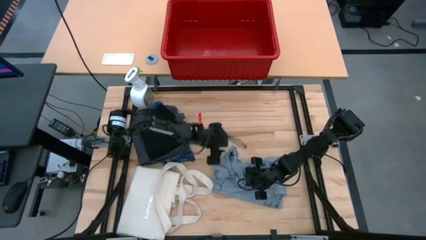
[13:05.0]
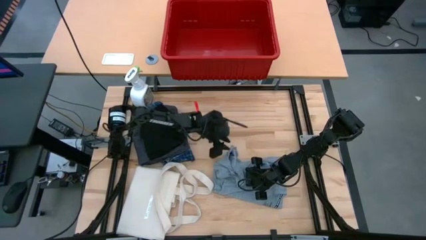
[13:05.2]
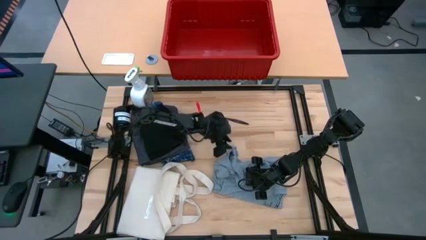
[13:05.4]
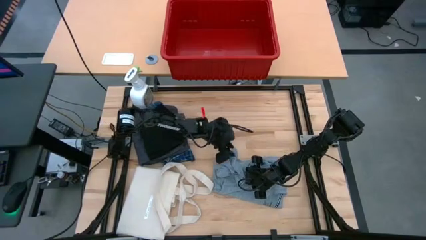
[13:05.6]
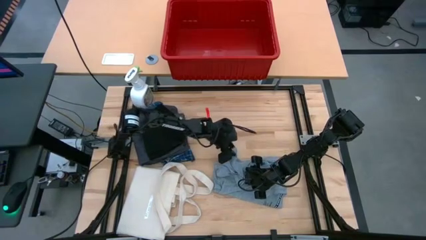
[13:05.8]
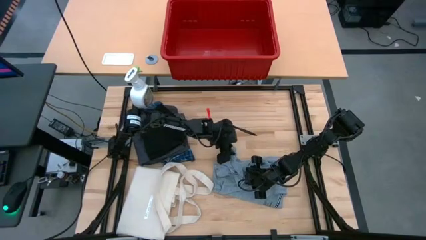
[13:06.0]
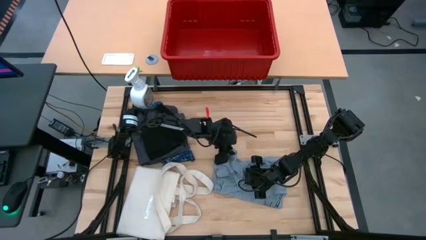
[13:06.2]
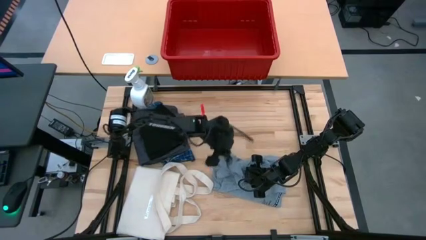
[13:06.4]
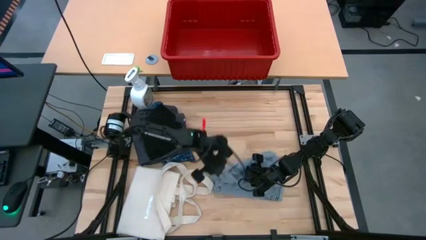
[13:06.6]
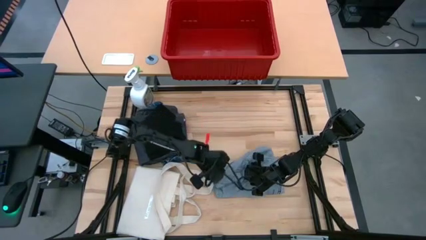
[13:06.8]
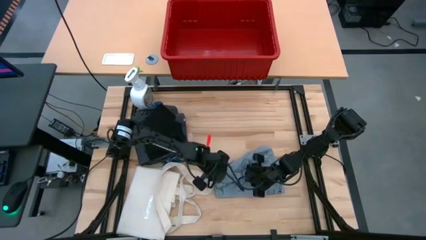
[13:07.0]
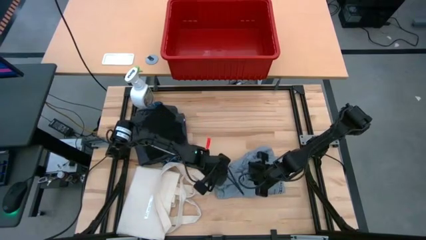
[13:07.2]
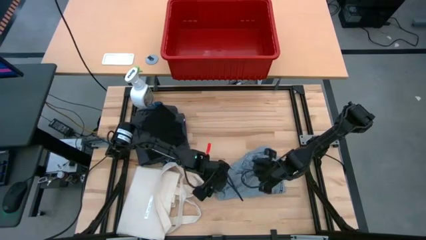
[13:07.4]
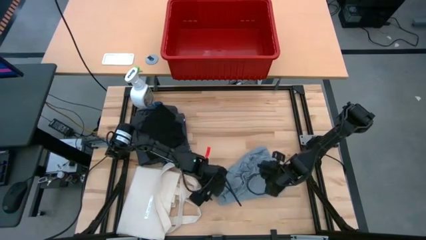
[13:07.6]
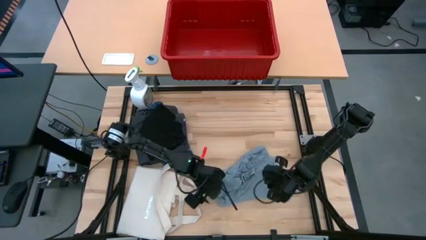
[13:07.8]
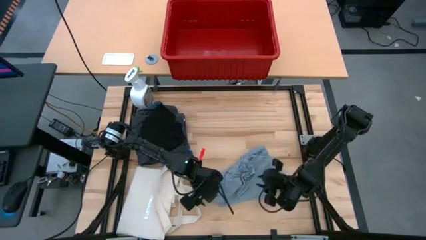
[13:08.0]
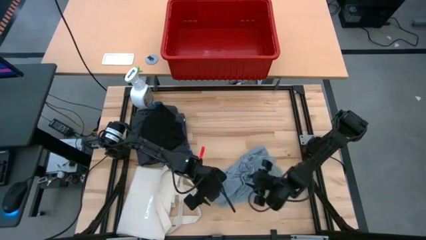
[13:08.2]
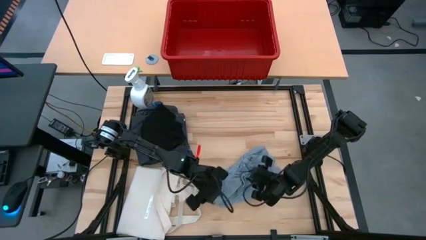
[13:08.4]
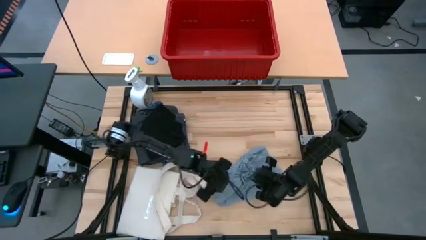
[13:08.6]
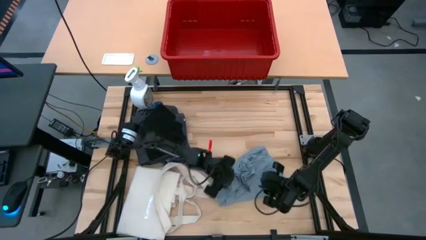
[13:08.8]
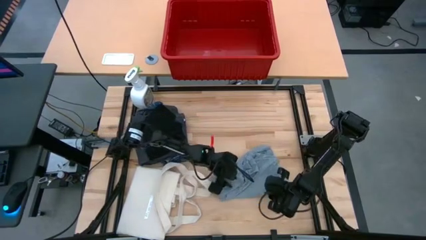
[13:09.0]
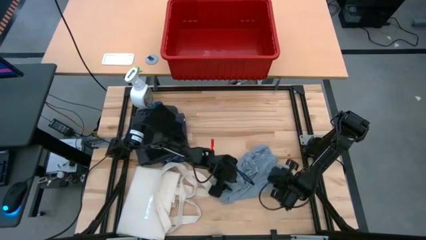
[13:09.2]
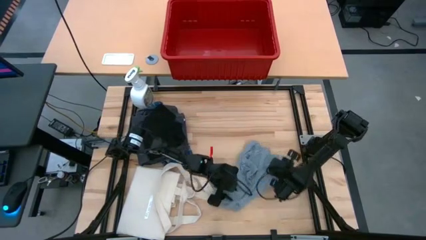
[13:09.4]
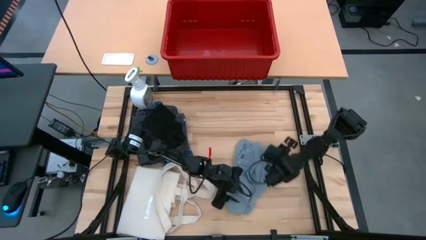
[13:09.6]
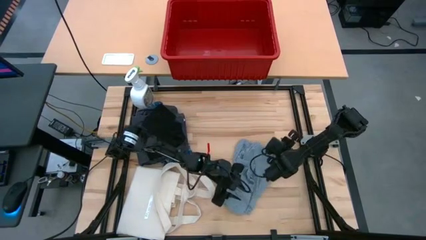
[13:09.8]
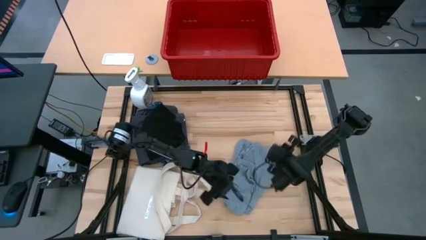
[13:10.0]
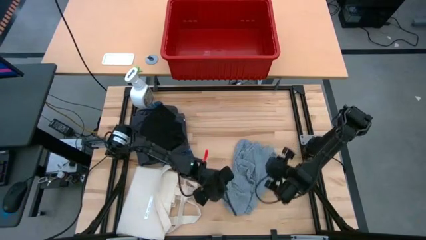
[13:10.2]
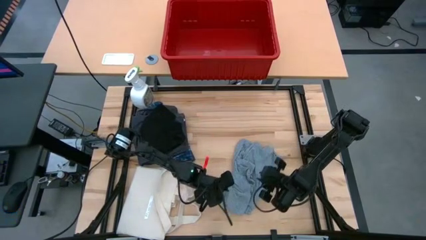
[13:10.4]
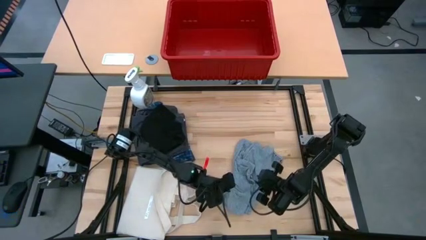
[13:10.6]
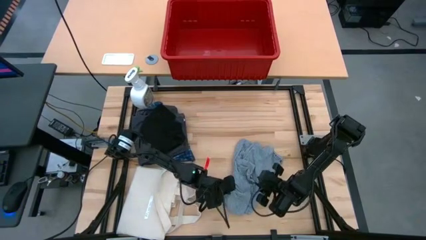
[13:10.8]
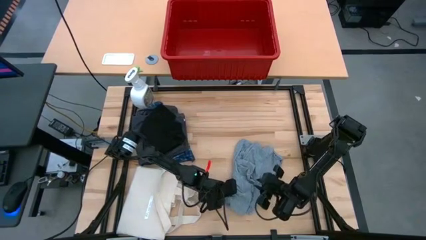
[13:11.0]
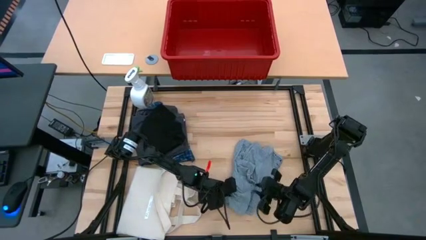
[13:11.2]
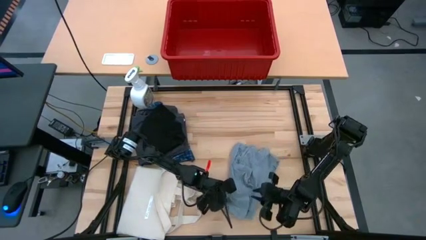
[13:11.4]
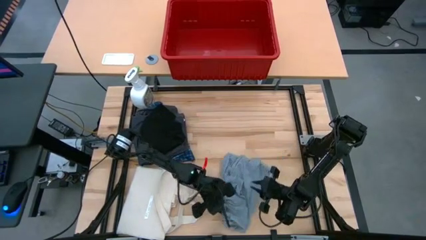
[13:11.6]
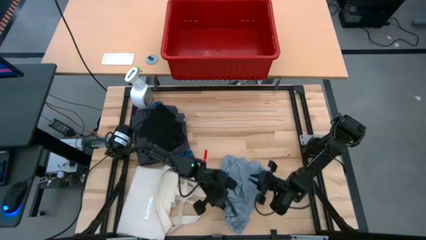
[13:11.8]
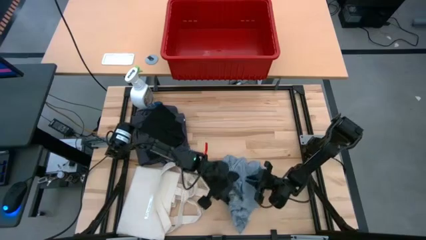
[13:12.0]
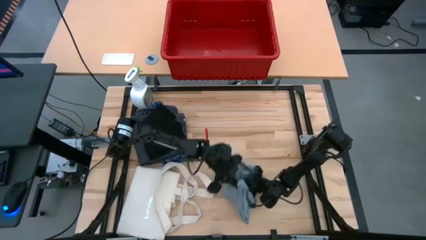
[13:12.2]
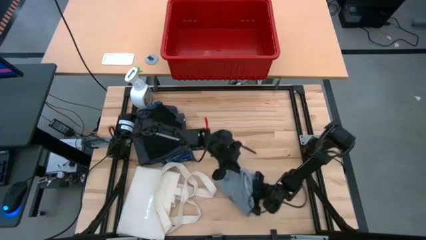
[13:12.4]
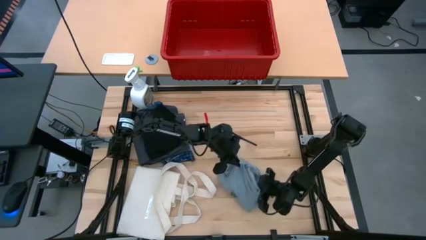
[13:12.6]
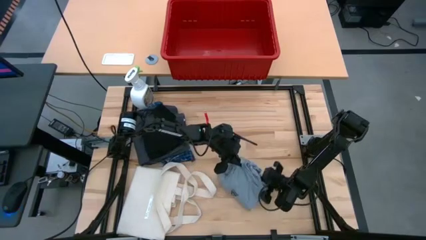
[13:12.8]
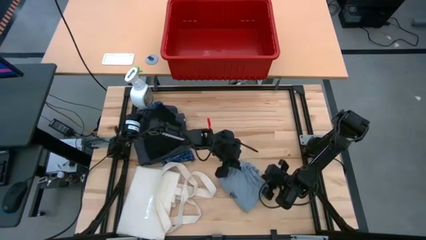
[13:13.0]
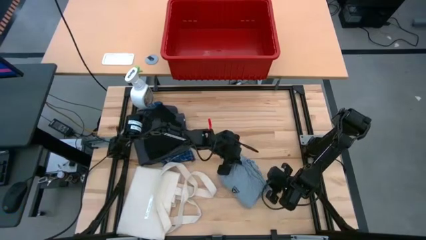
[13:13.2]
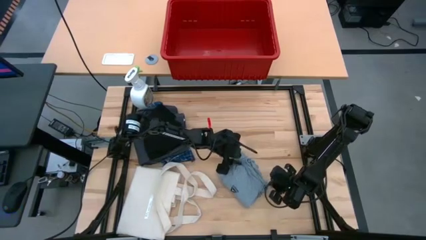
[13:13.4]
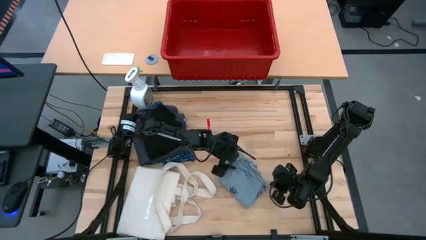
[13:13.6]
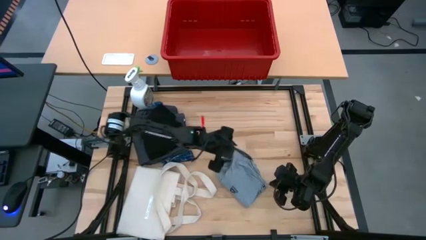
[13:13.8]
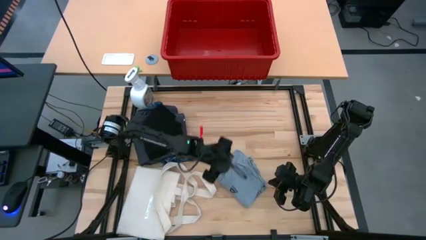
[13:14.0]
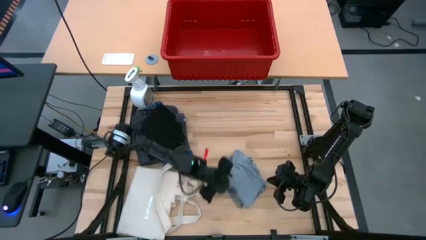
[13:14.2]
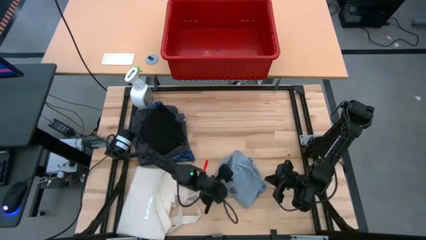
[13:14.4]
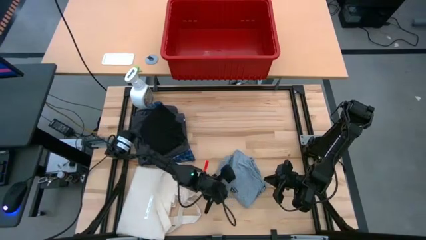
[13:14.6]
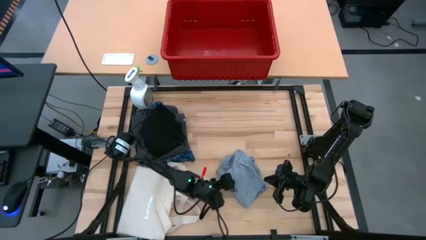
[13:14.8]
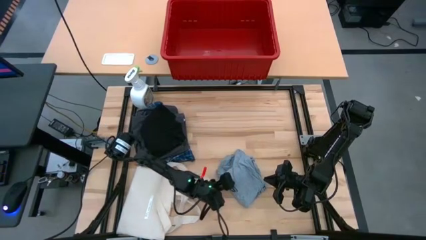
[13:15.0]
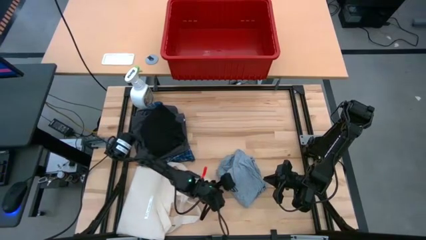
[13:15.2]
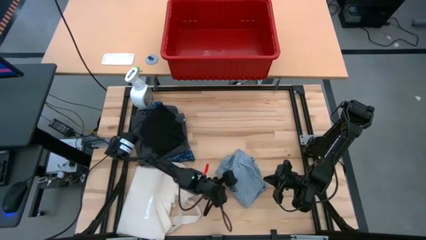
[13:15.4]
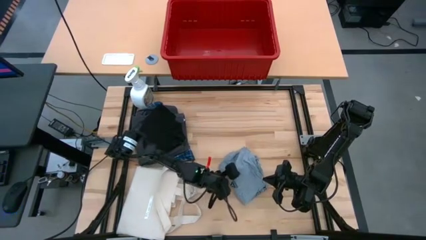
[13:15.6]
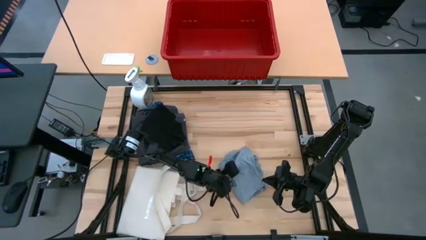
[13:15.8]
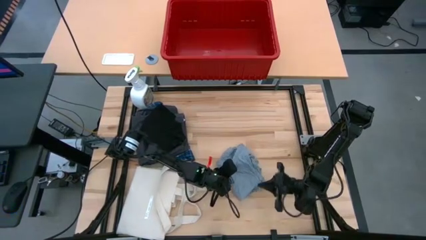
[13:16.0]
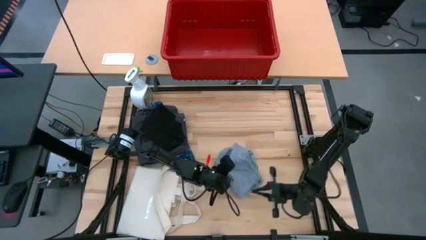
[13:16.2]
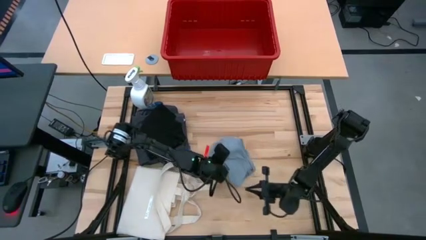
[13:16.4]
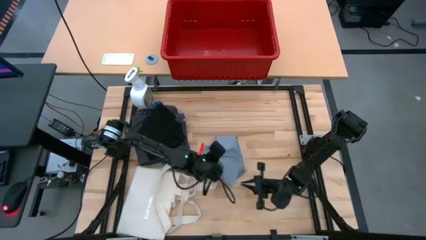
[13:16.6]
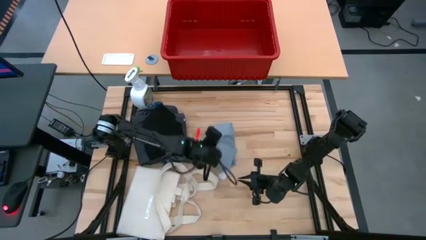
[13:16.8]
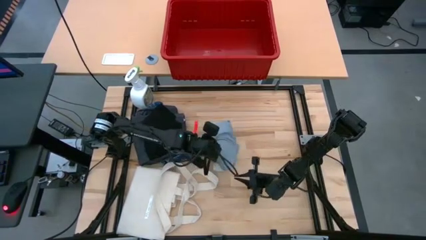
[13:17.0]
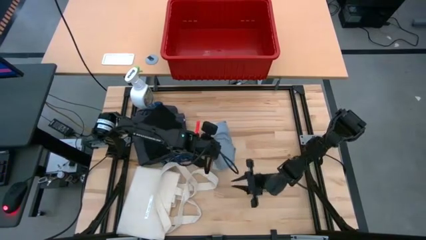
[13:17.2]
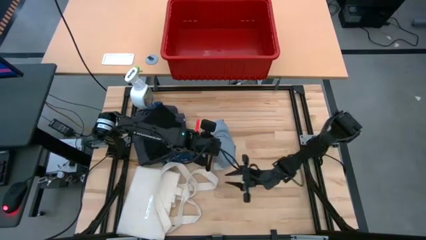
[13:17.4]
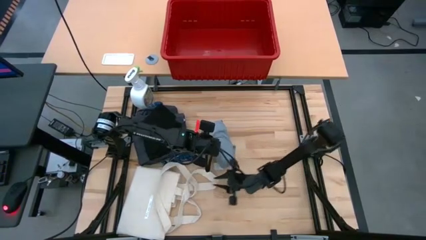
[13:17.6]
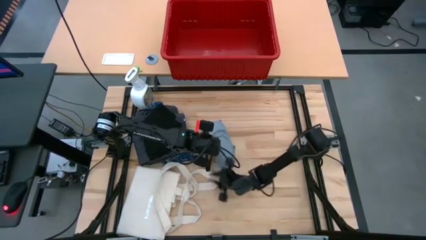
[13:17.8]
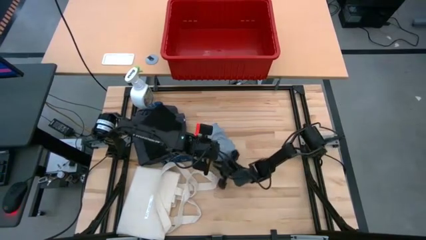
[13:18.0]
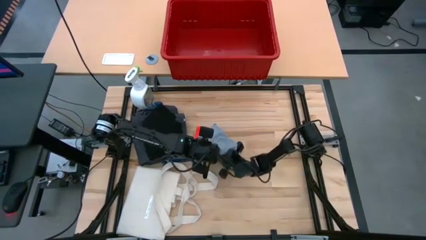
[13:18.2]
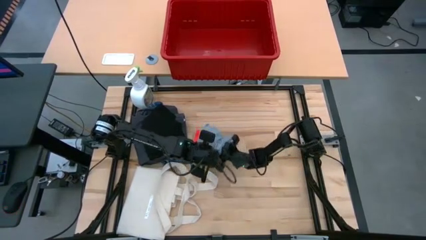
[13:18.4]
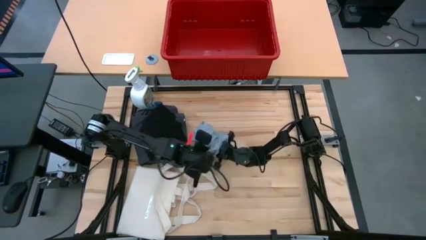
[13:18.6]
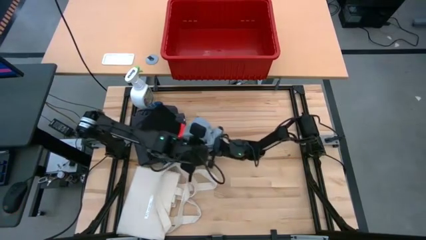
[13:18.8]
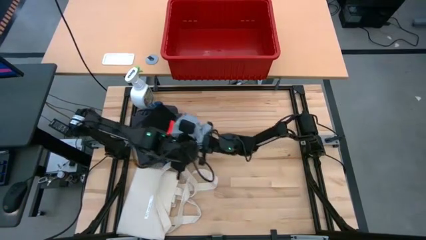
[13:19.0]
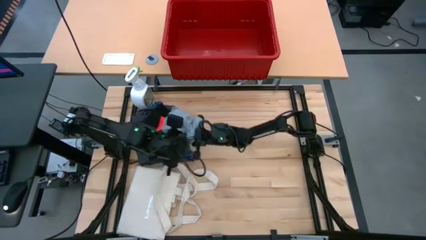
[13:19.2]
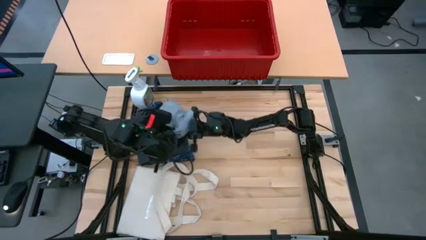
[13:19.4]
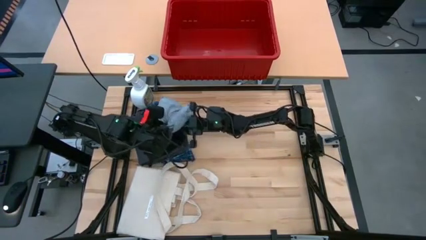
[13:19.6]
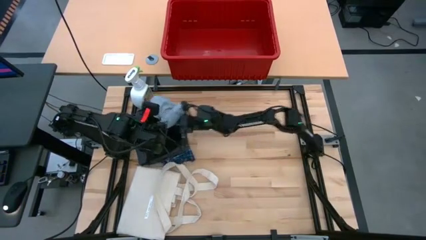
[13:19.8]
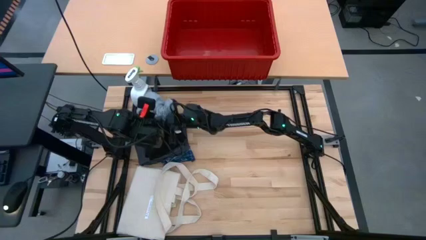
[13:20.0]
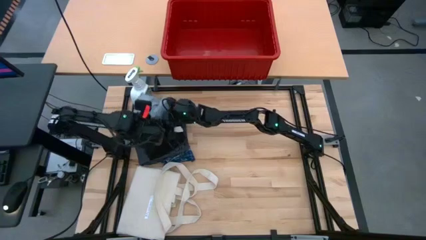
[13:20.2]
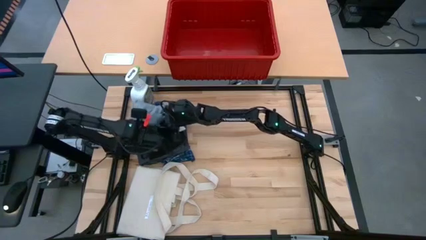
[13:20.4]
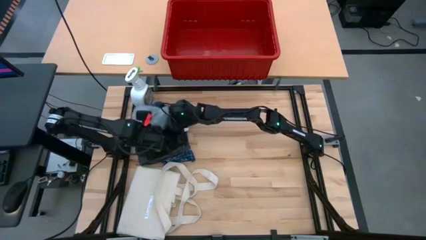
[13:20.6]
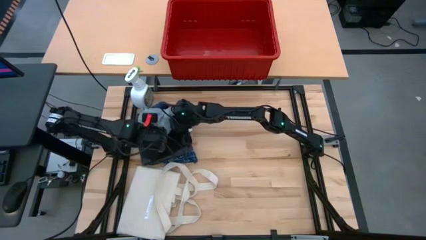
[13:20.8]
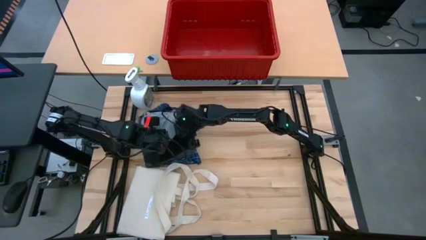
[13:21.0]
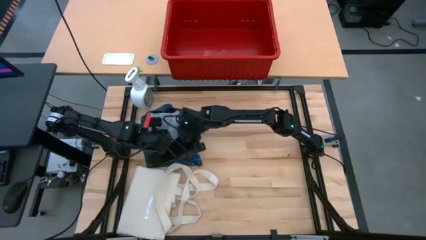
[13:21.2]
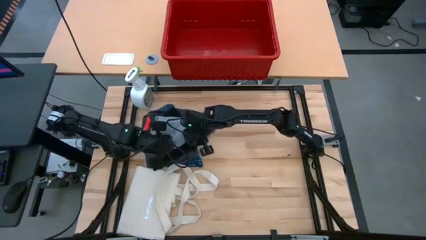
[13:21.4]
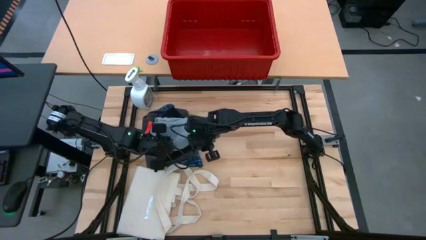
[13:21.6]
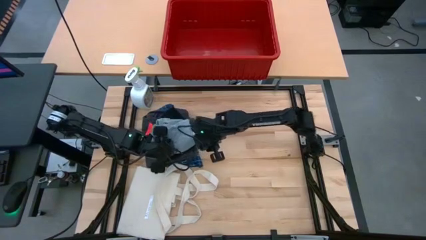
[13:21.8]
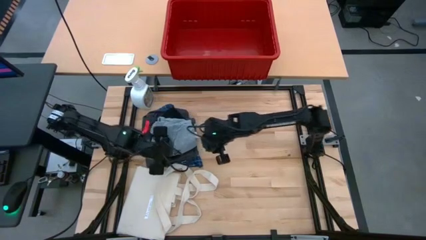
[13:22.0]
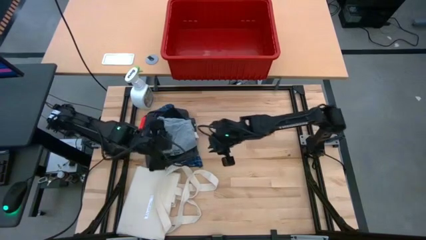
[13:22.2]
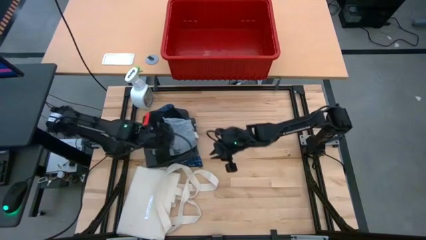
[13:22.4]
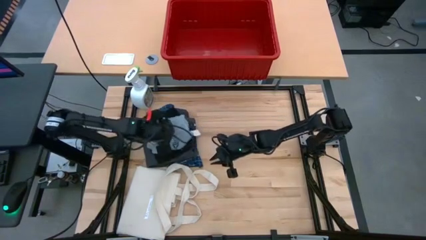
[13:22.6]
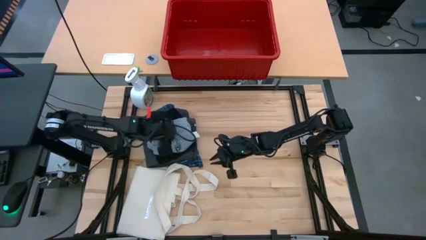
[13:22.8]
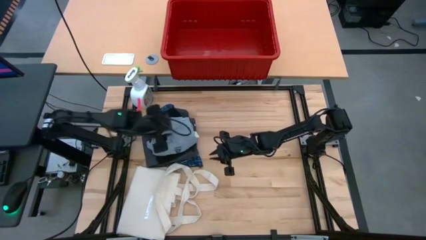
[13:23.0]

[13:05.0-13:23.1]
Task: Fold Laundry from Bin
Fold the gray shirt
